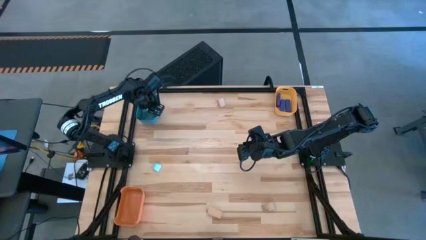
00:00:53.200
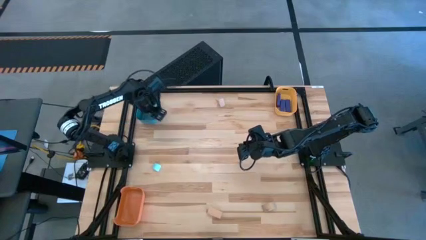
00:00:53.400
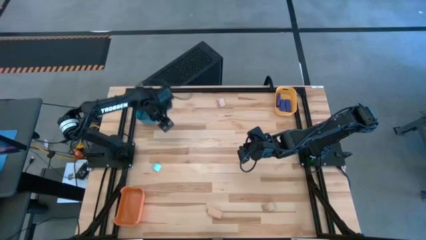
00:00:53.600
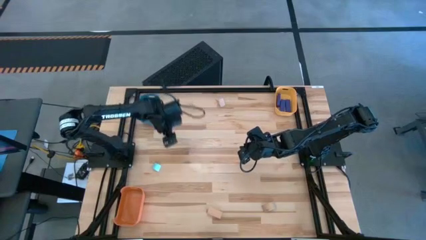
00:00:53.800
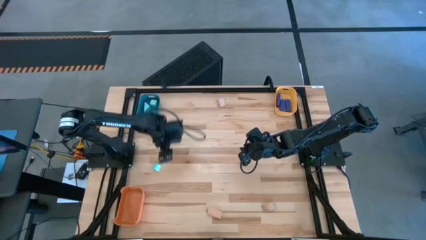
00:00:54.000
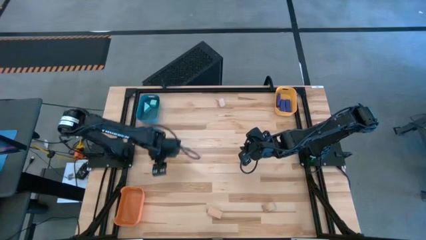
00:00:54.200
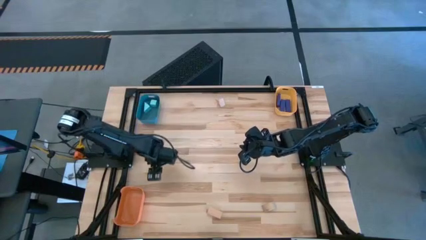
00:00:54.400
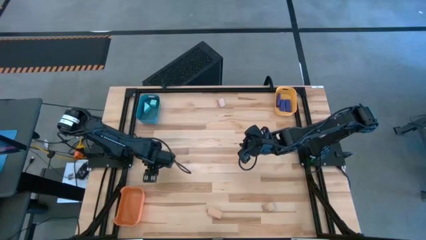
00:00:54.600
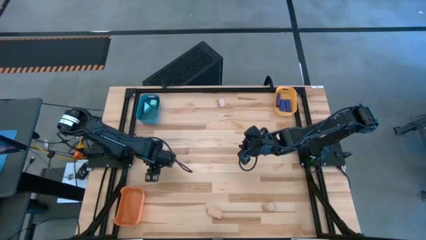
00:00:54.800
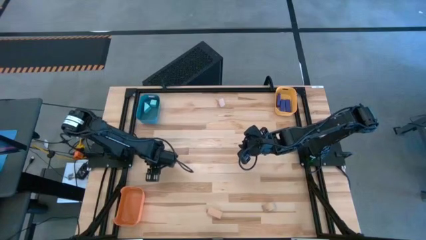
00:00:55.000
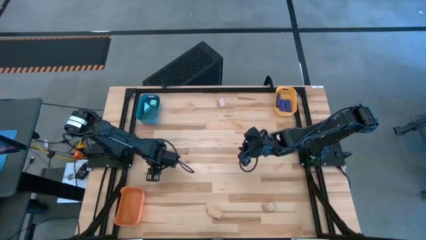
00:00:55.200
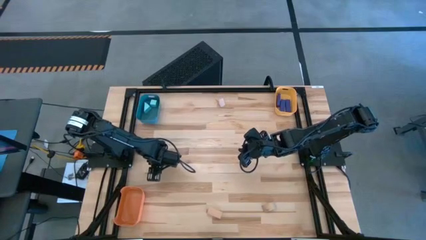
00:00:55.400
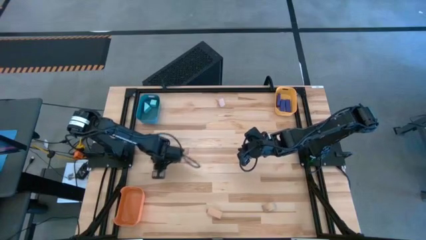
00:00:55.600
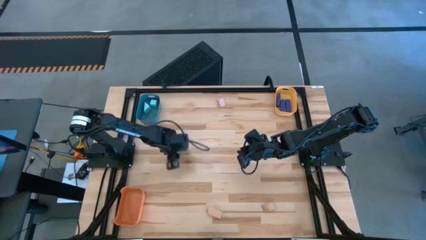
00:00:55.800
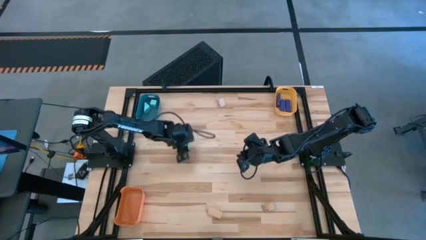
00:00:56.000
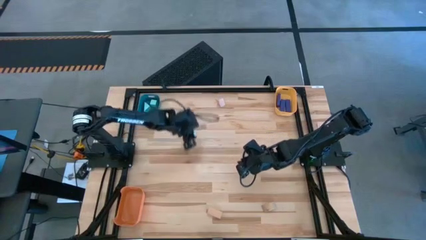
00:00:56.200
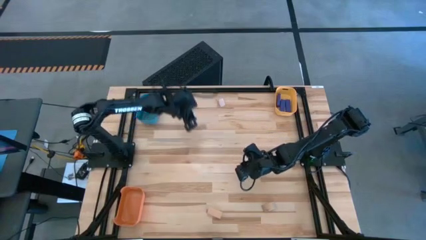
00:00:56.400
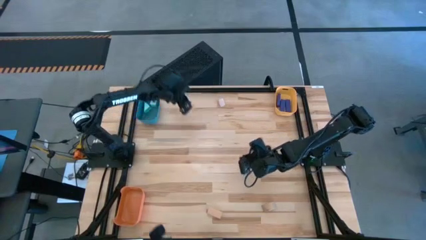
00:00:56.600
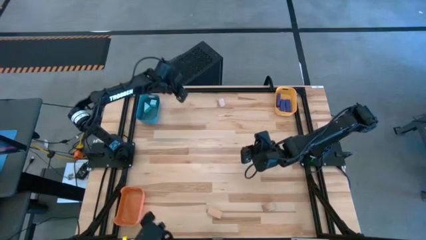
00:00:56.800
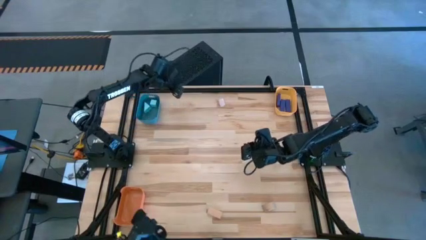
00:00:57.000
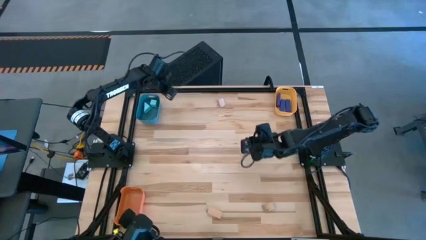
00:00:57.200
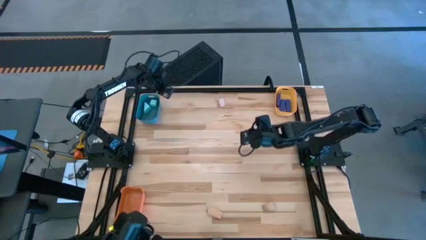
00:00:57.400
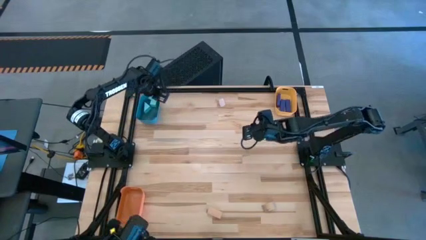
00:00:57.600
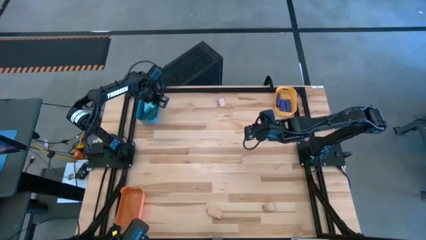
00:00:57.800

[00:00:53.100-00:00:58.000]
Task: Sort & place blocks by color
Put the light blue block into the blue bin

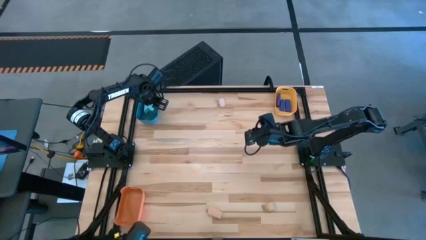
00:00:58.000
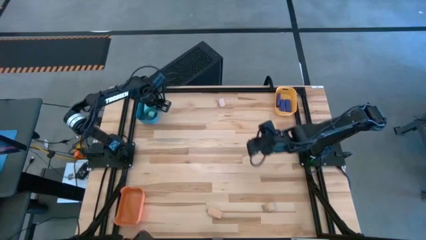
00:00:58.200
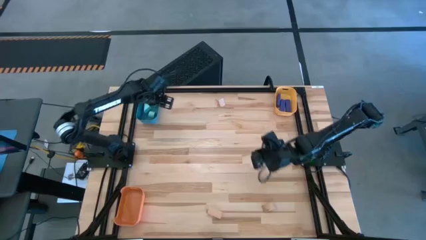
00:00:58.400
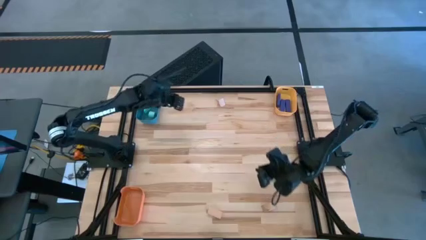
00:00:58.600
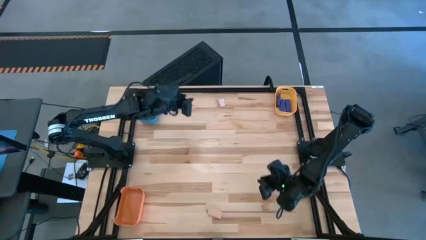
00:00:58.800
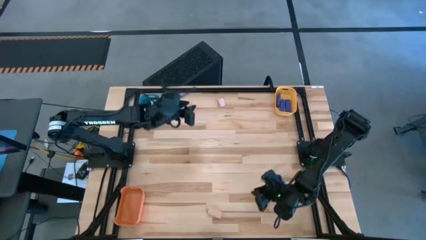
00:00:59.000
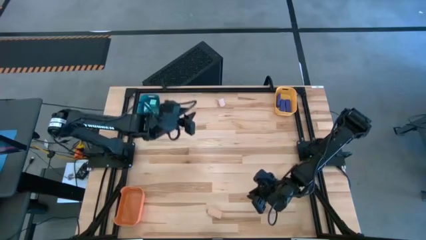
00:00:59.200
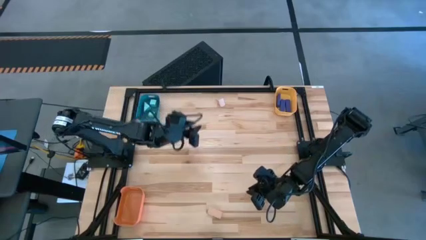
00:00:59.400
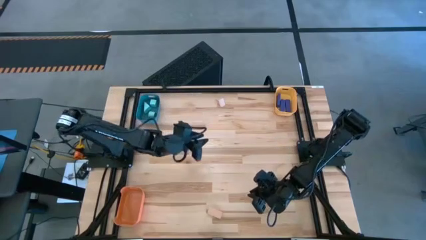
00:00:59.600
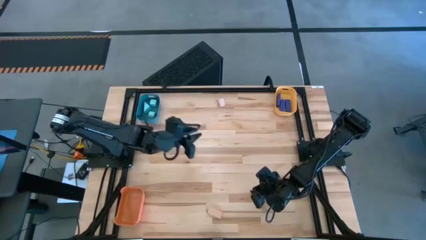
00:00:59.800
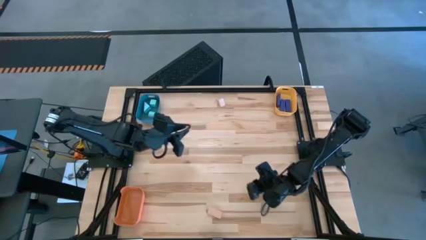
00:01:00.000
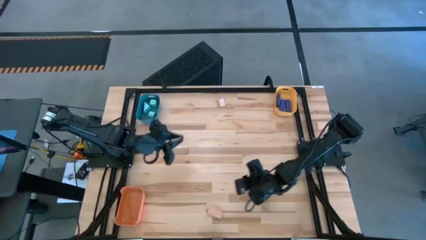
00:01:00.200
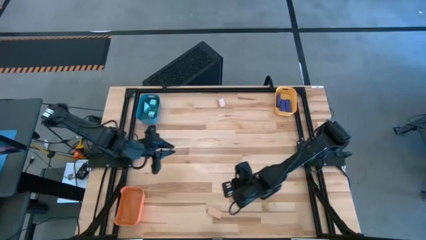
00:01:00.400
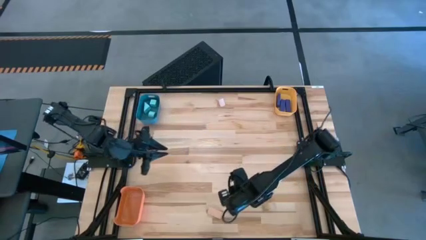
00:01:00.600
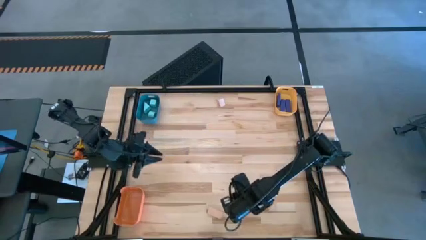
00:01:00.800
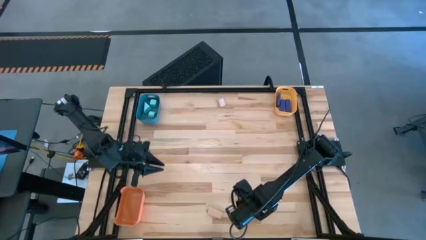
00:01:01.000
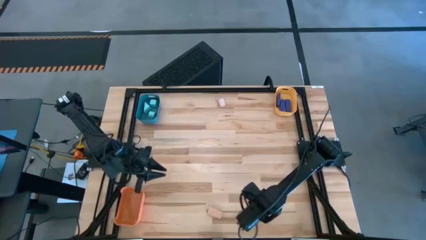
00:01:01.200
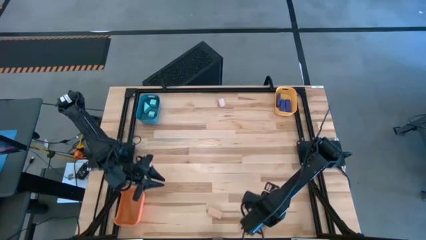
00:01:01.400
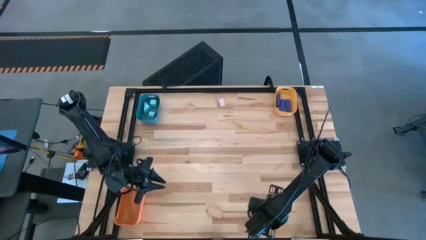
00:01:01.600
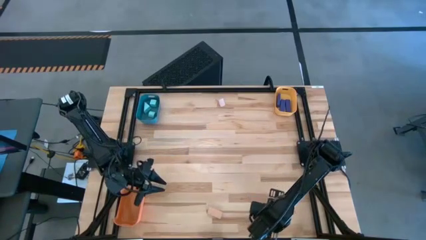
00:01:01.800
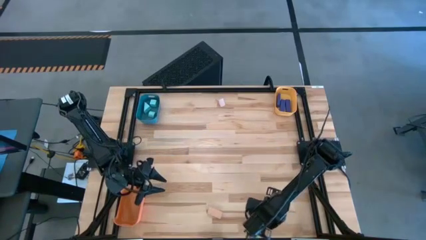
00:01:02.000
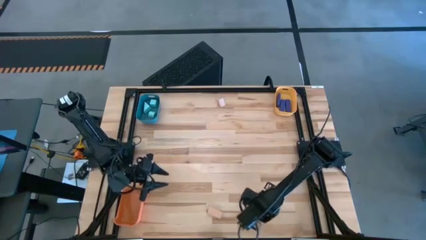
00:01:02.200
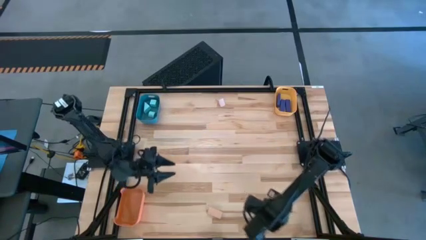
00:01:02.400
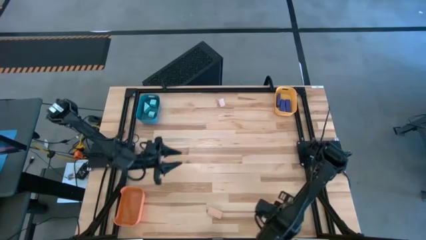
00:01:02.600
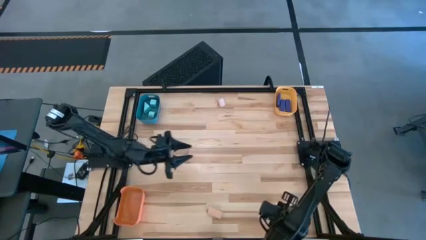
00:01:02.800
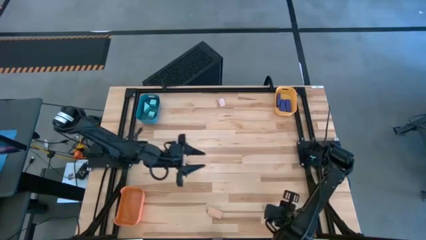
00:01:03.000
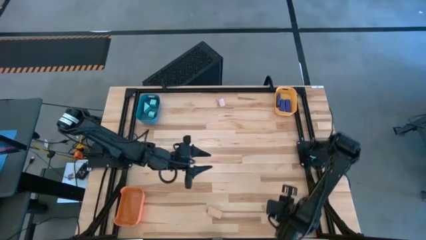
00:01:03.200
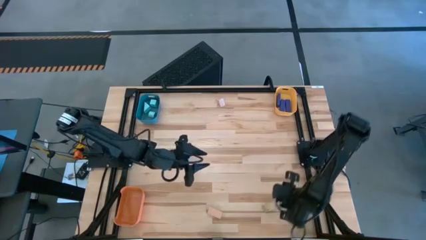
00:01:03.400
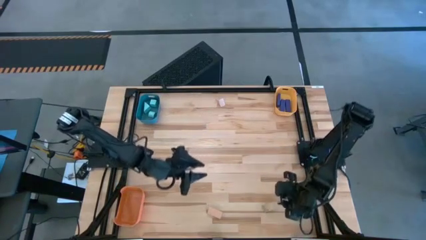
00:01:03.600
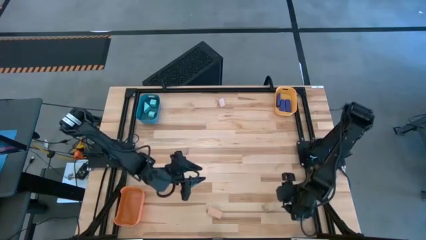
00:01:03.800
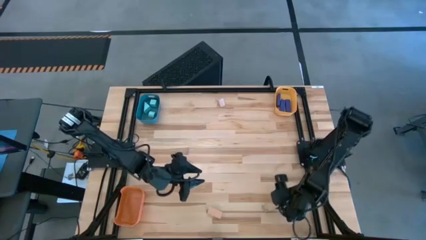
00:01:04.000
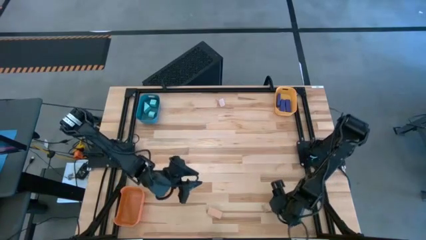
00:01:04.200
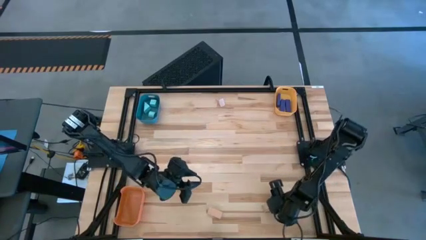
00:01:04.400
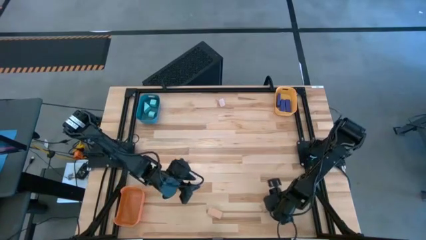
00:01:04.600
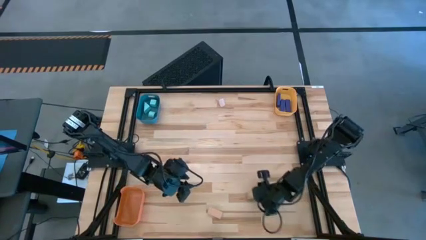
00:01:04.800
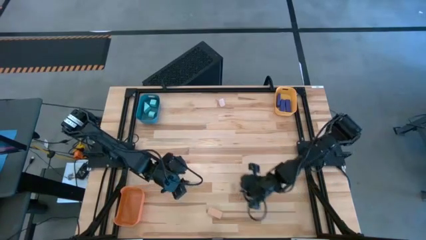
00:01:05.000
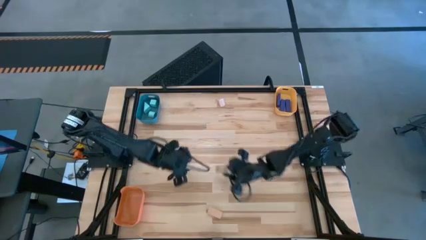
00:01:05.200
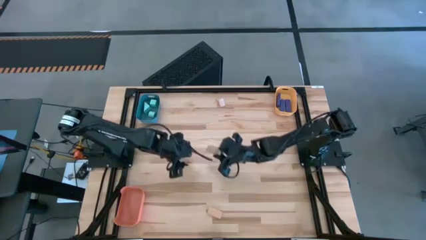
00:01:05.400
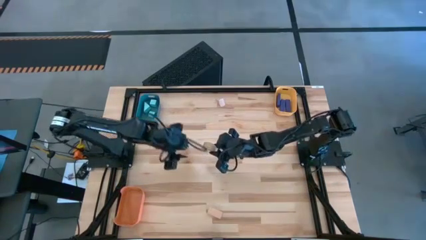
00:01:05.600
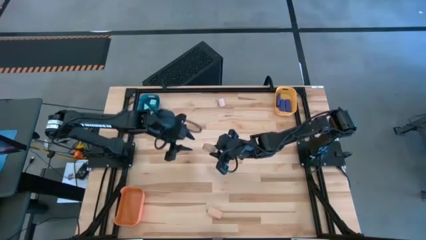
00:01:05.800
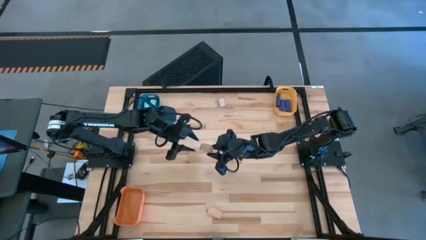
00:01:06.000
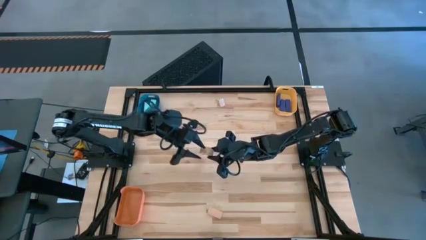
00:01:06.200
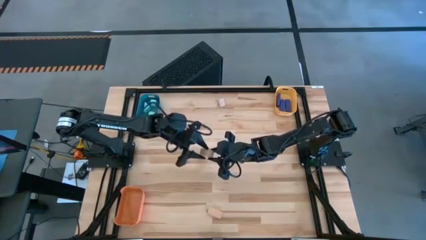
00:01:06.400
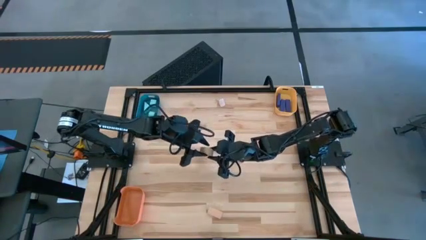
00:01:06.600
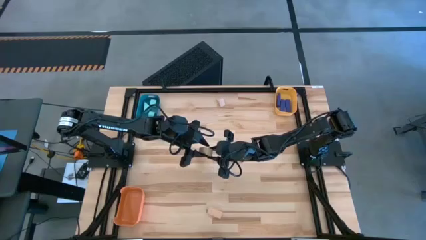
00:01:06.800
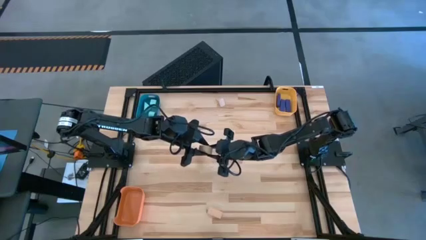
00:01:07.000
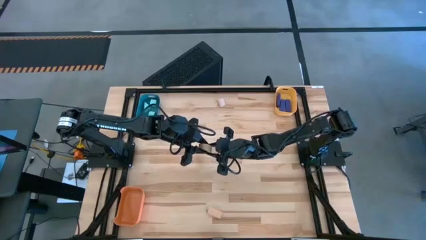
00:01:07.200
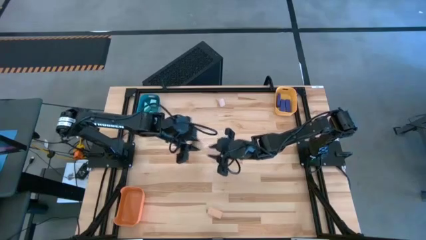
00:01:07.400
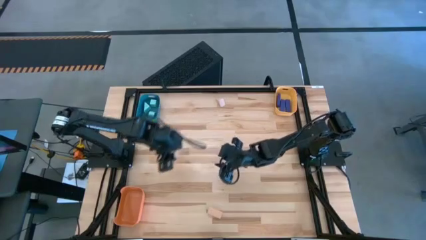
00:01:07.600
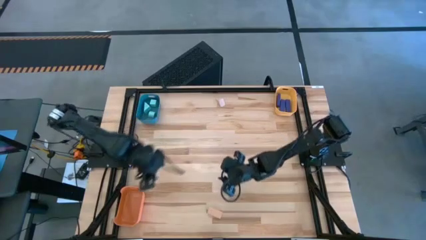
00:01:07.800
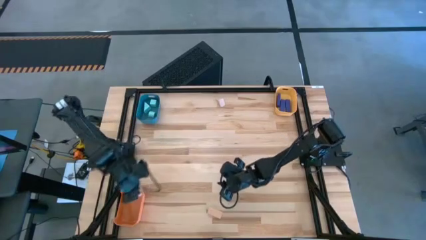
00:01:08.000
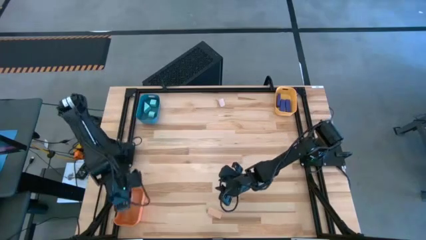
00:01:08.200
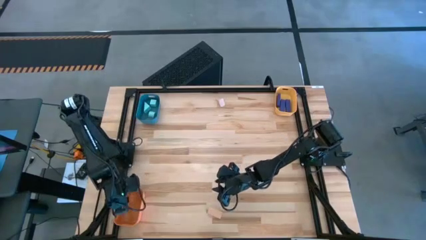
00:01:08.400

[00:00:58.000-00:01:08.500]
Put the bottom right brown block into the orange bin
